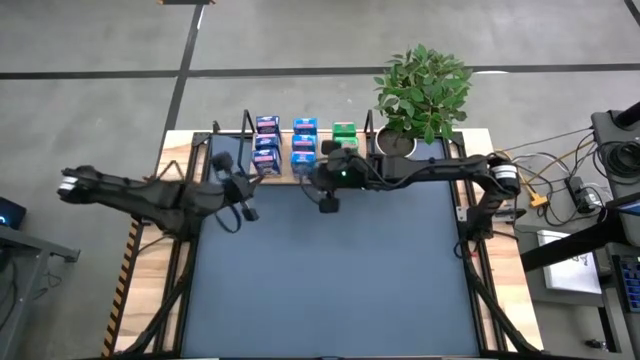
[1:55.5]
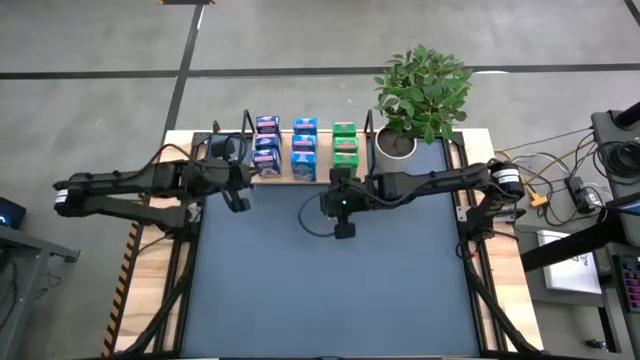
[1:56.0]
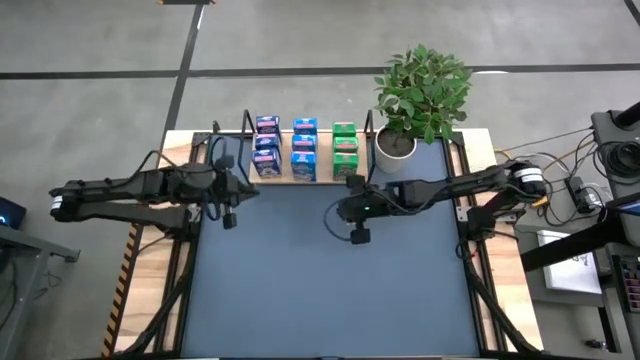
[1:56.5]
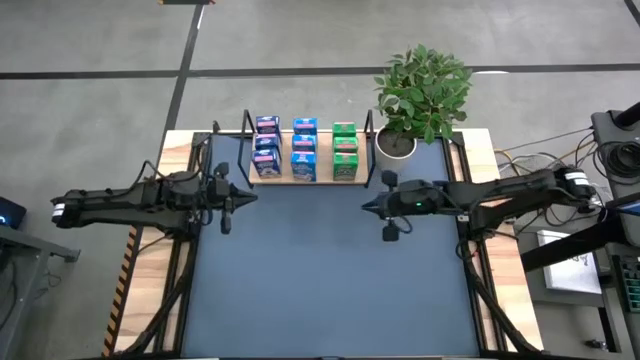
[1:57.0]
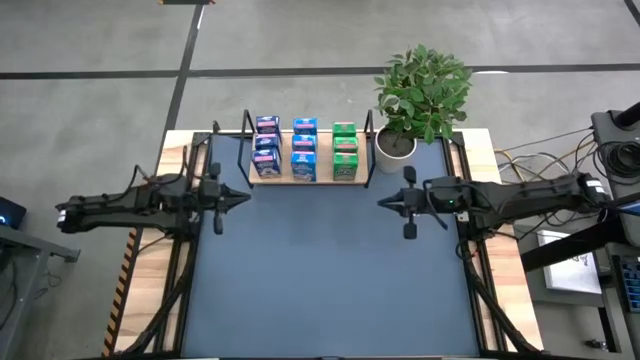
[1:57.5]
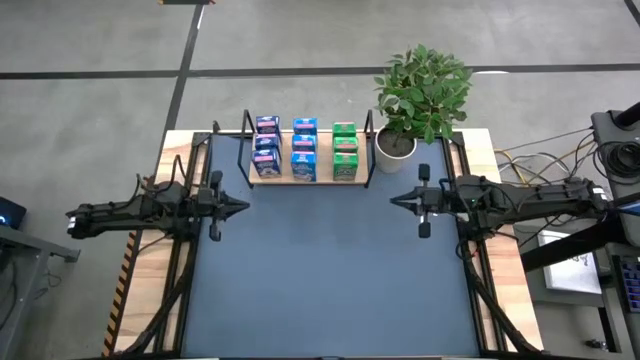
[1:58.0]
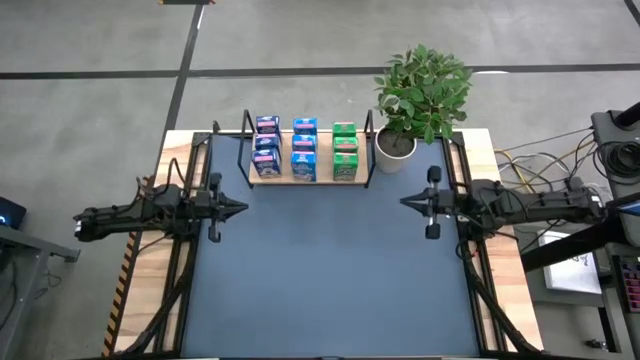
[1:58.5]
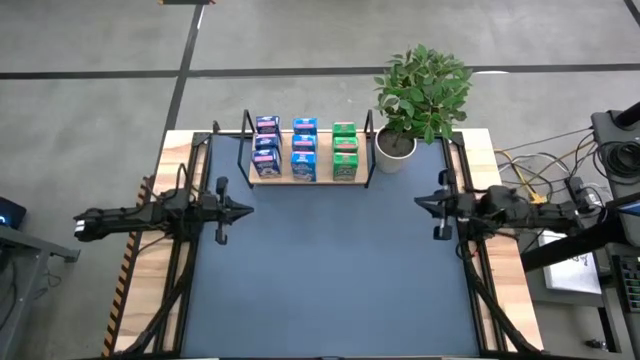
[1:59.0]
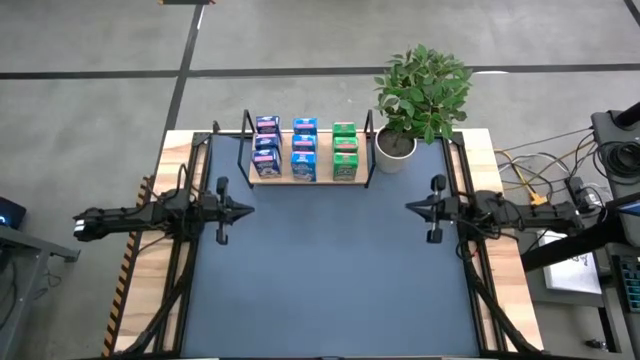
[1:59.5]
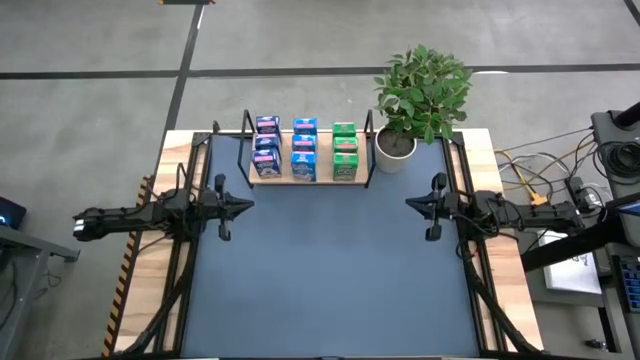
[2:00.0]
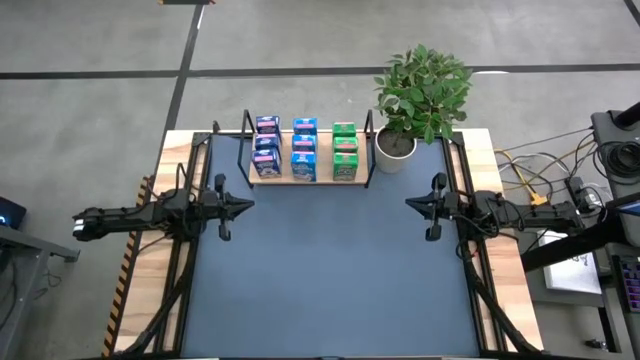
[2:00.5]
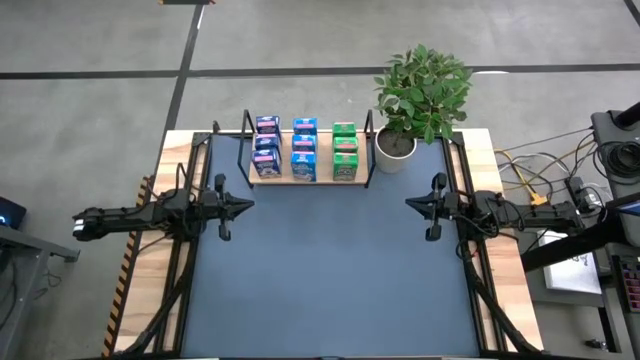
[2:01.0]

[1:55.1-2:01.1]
Task: Stack cereal on shelf
Return to Home Position

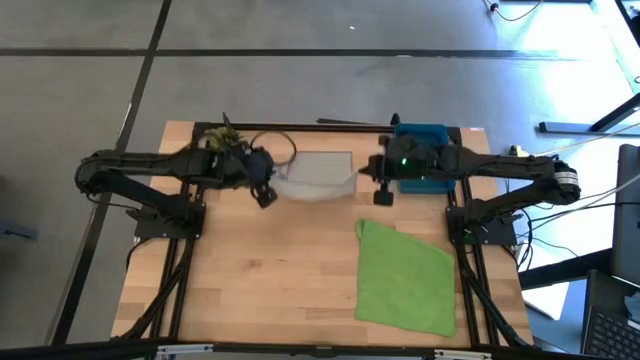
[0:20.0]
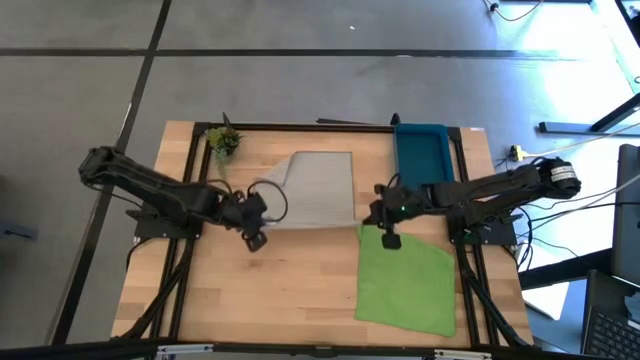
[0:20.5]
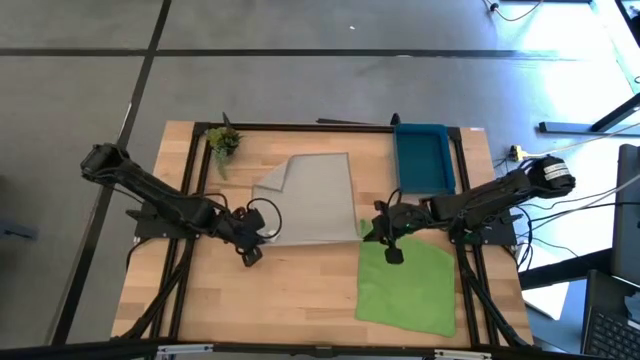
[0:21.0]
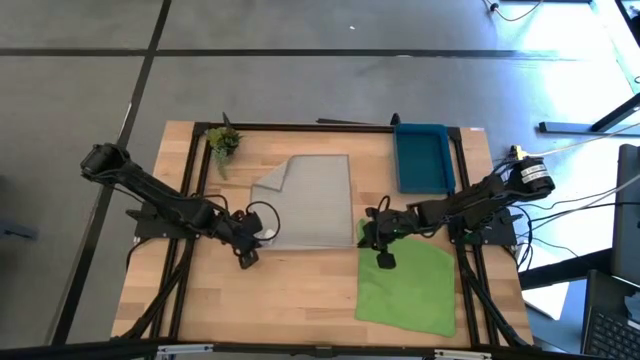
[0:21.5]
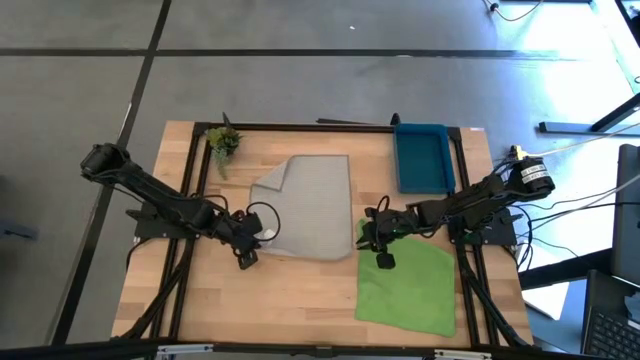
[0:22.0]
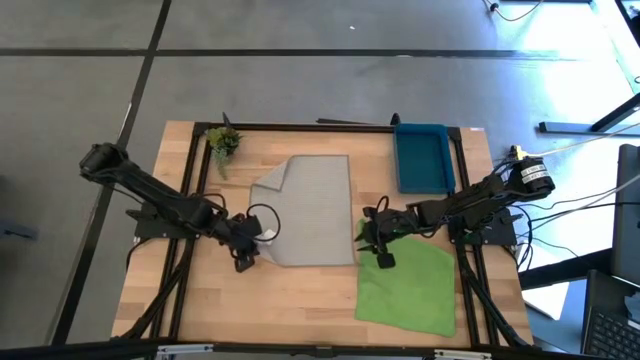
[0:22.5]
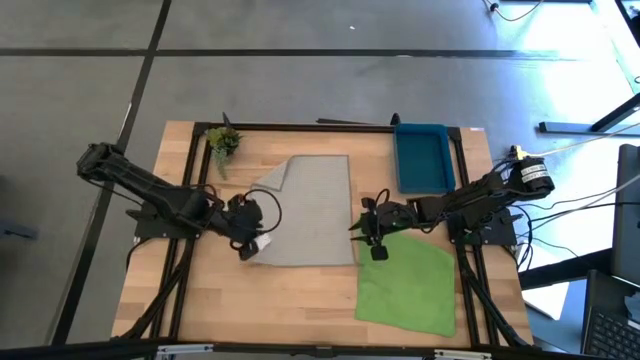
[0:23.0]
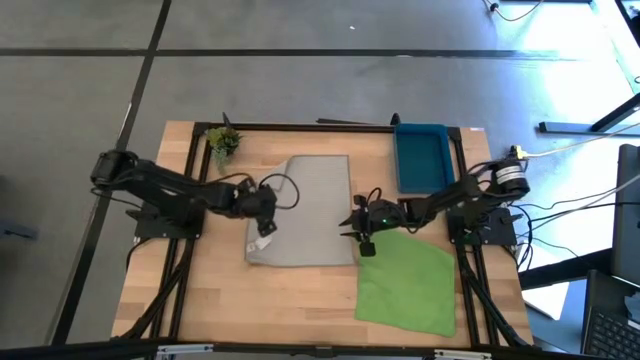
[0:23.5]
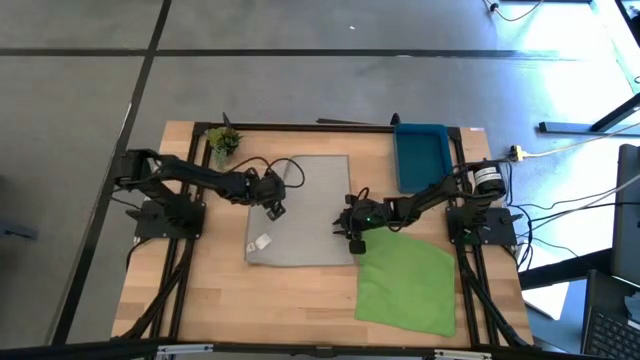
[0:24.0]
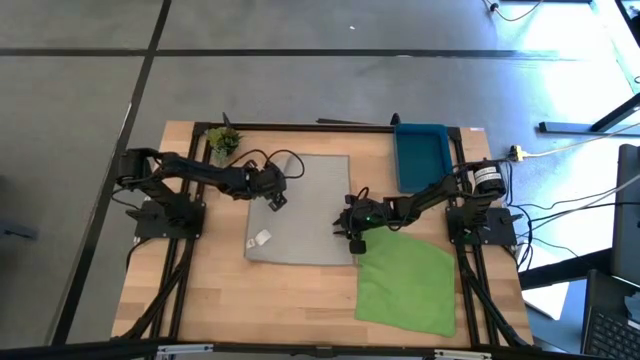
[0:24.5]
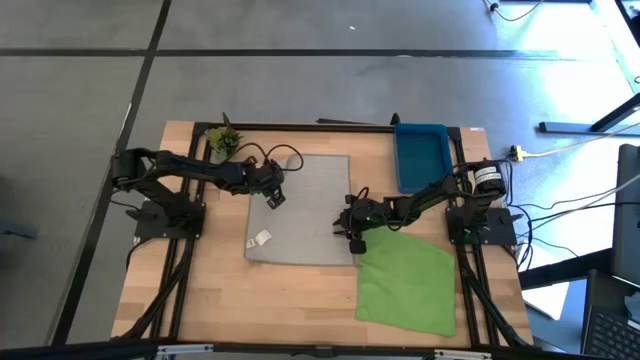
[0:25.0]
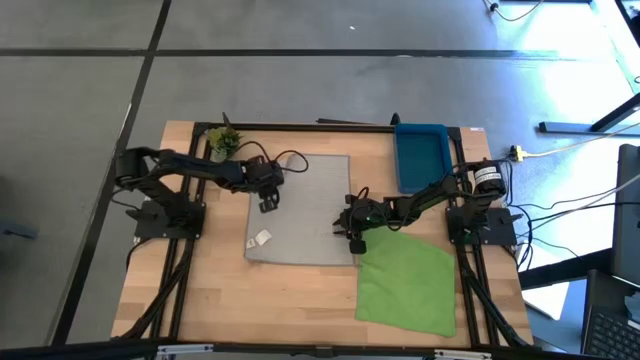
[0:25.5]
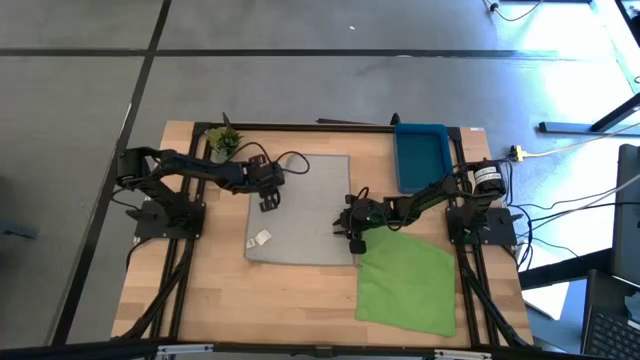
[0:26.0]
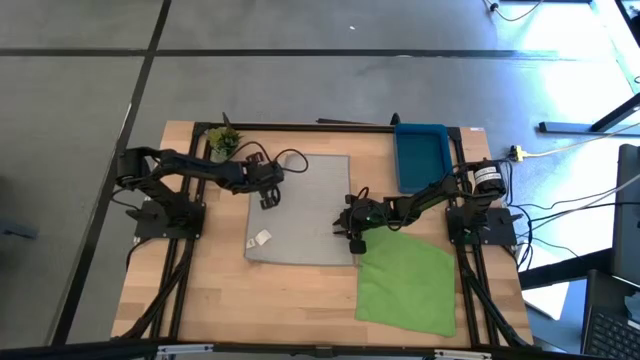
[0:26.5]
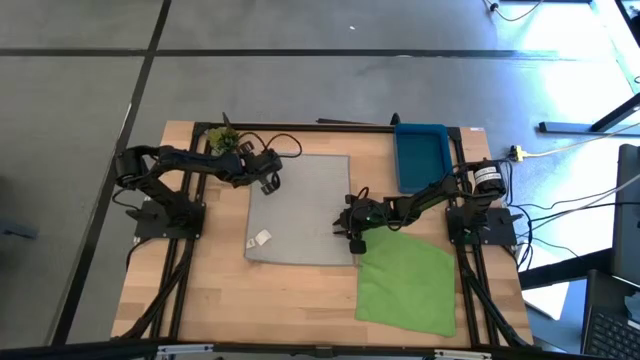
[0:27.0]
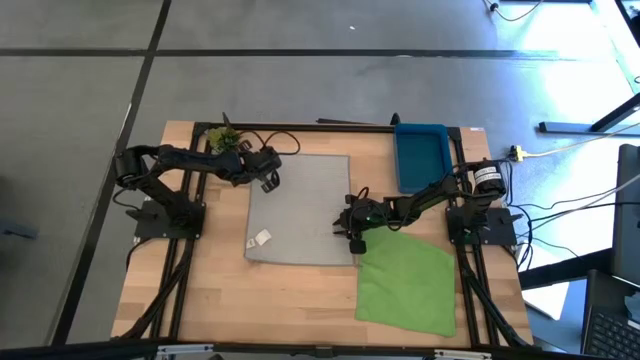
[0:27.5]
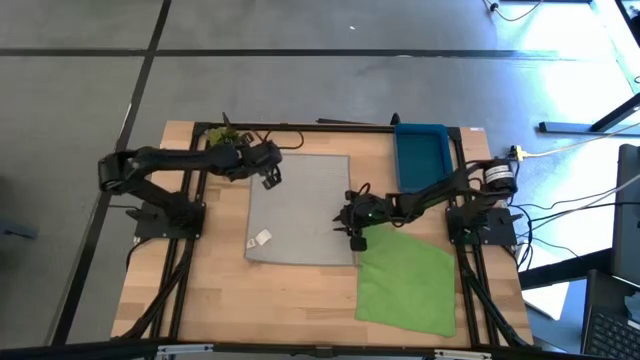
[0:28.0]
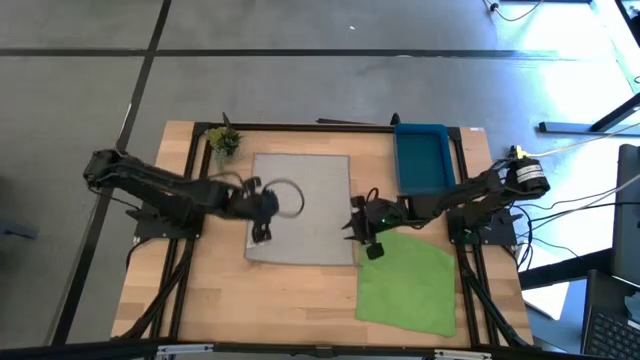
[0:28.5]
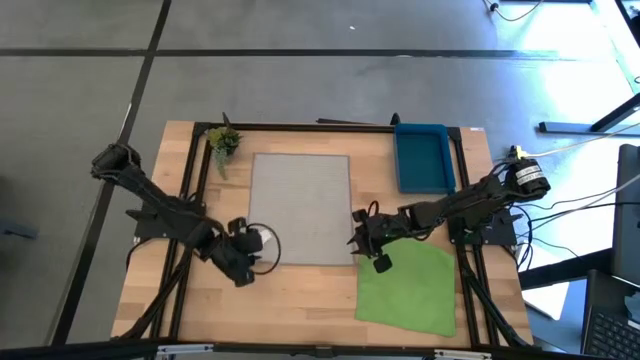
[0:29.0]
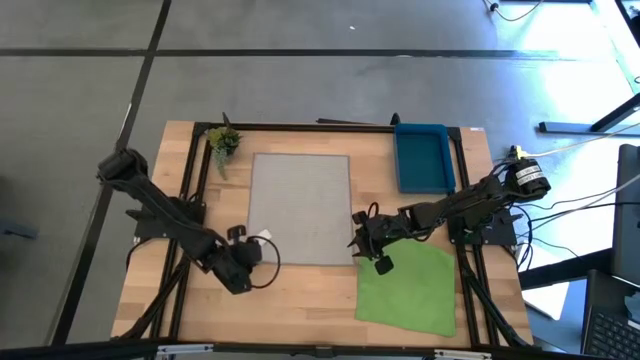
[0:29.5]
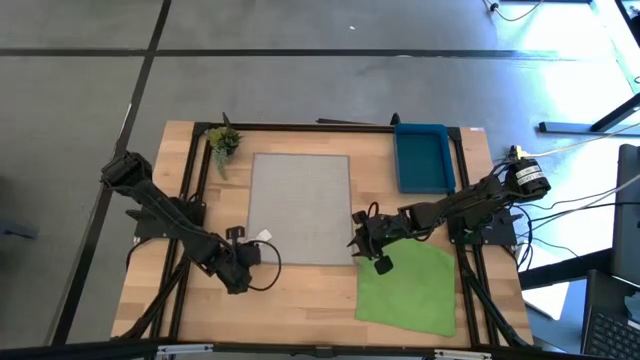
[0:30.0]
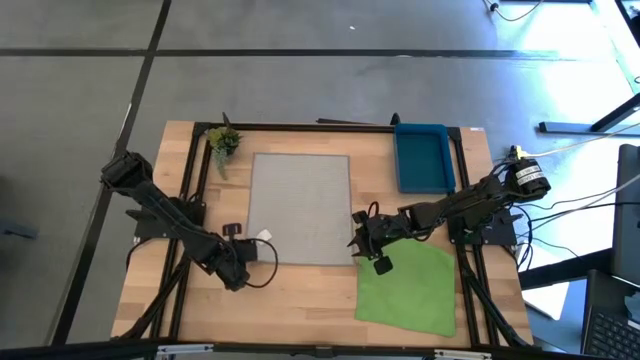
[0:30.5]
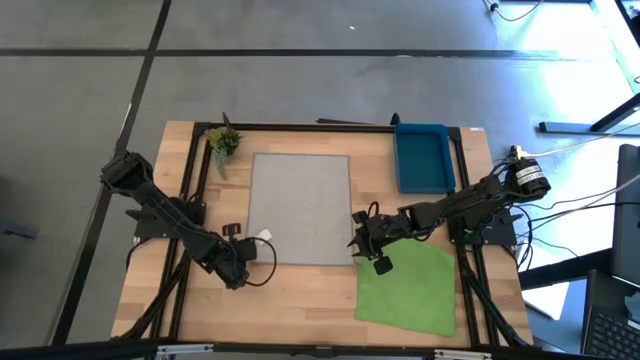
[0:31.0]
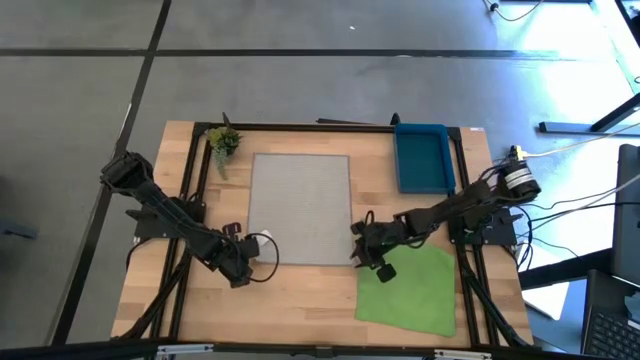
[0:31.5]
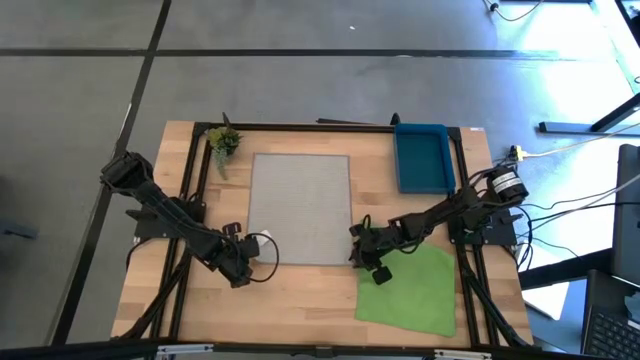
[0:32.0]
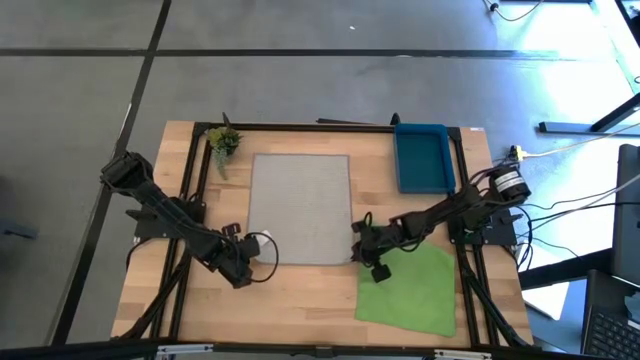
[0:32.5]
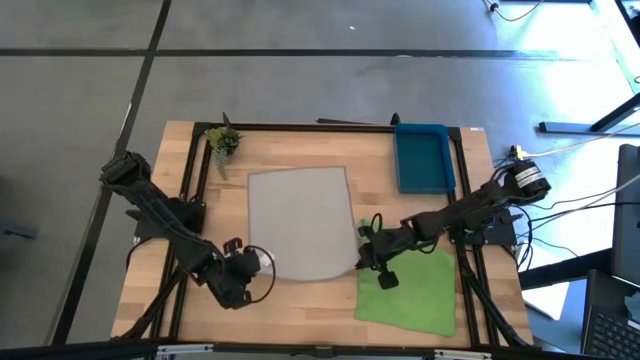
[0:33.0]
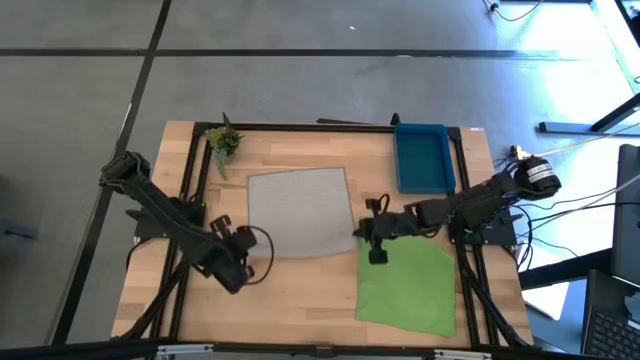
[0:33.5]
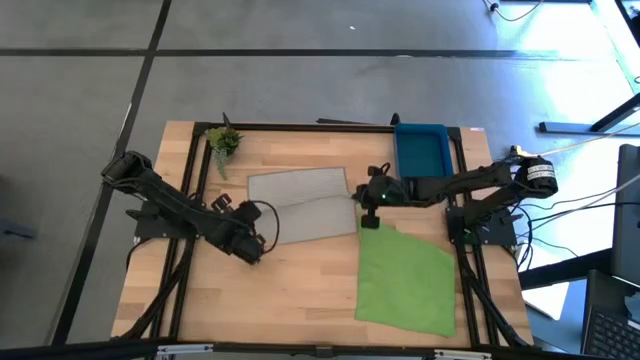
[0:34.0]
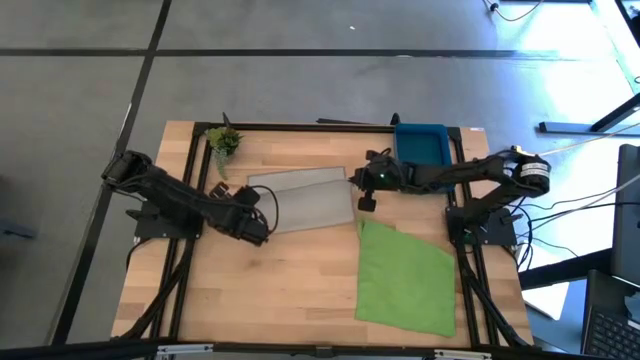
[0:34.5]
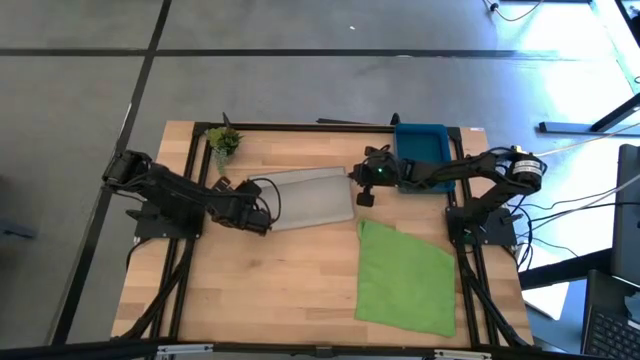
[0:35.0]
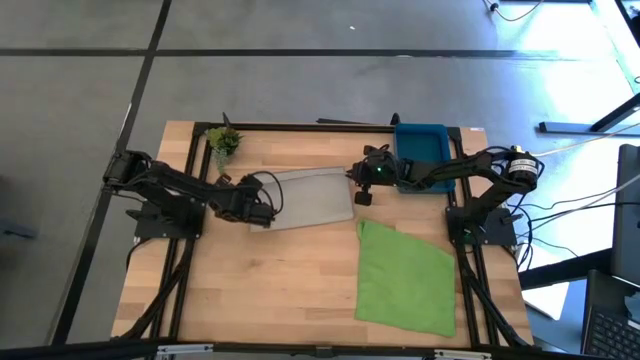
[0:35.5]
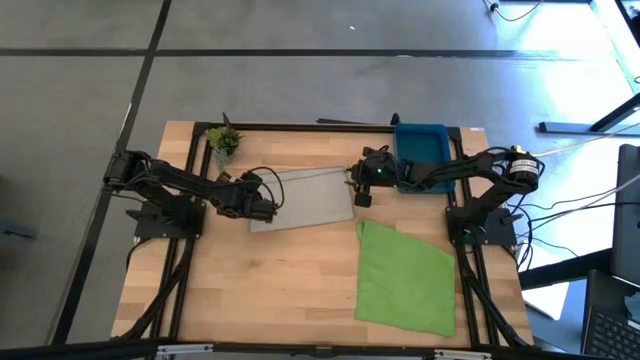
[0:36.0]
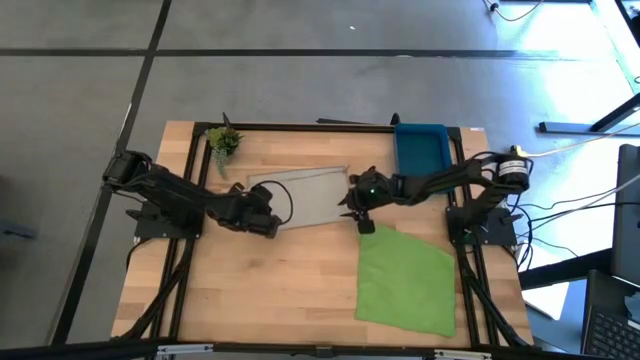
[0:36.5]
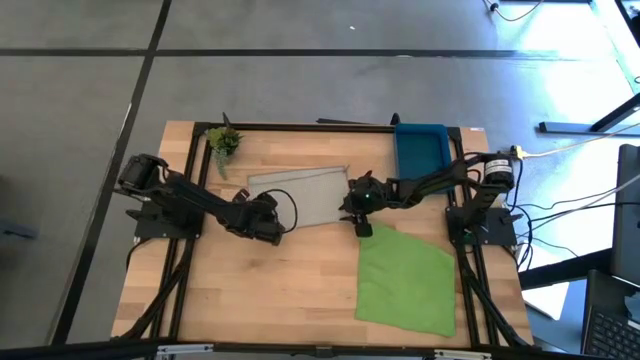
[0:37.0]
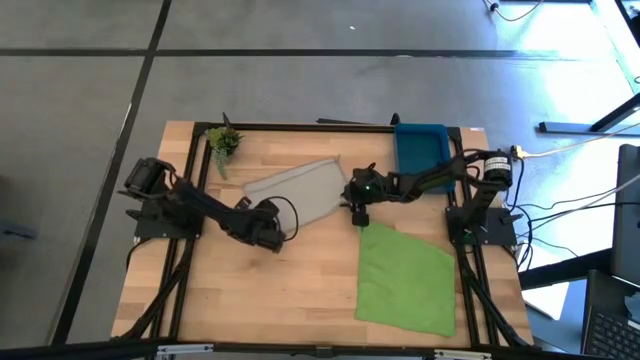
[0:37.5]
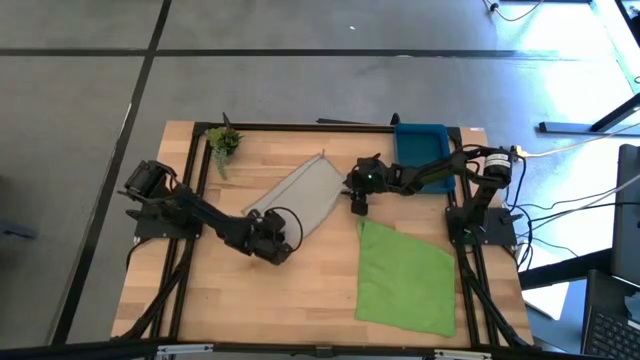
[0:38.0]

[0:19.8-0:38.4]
Task: Roll microfiber towels into tight, uniform cylinder then place into a basket
Roll the gray towel
